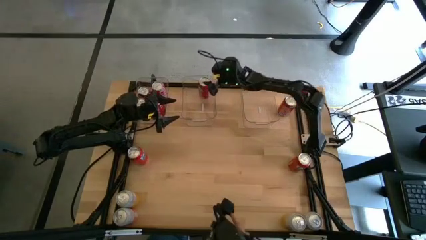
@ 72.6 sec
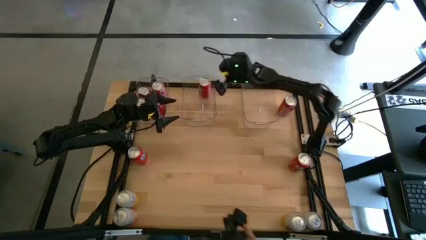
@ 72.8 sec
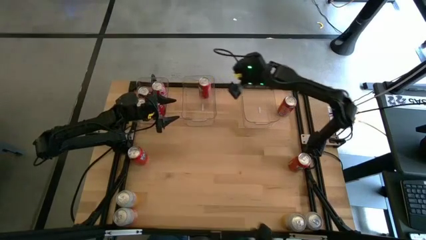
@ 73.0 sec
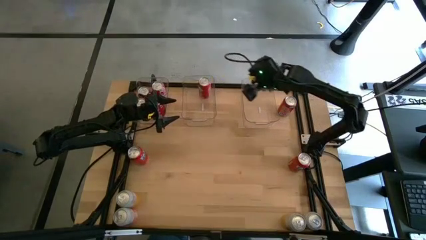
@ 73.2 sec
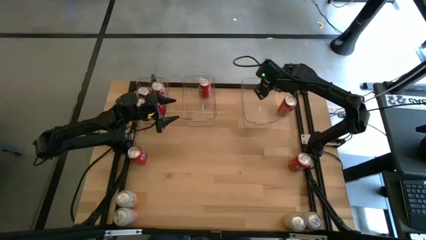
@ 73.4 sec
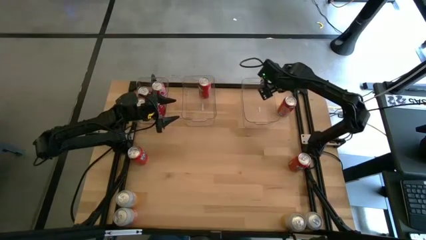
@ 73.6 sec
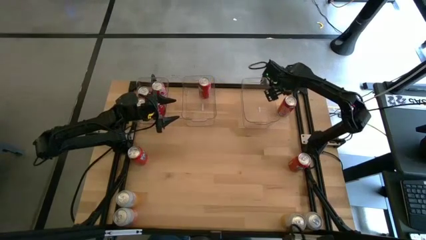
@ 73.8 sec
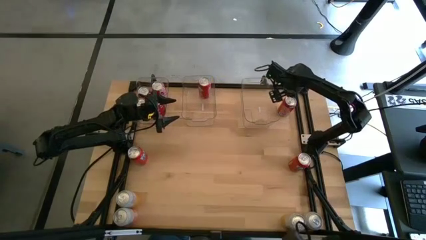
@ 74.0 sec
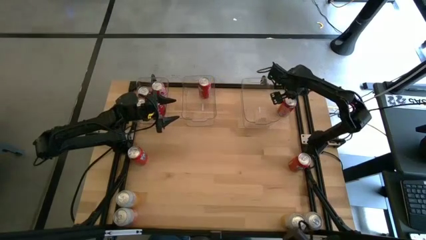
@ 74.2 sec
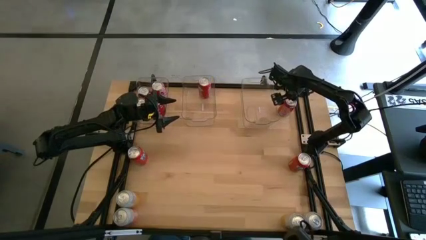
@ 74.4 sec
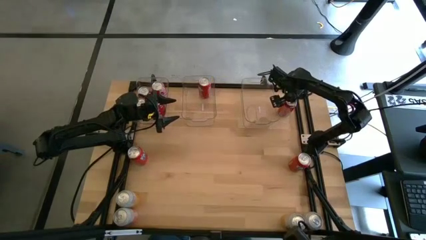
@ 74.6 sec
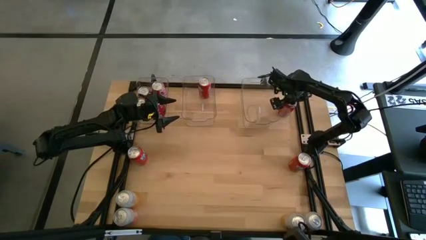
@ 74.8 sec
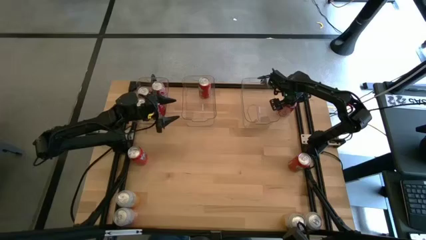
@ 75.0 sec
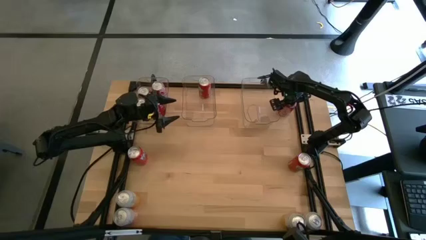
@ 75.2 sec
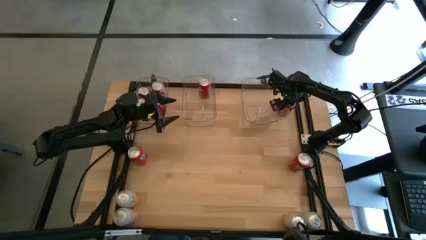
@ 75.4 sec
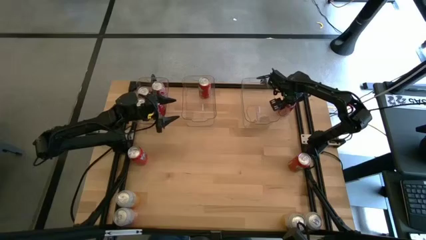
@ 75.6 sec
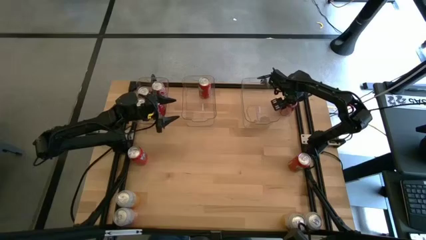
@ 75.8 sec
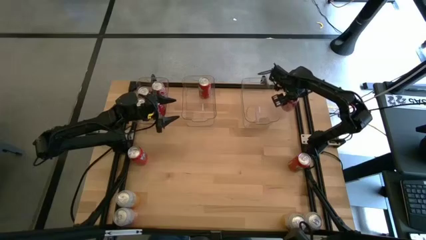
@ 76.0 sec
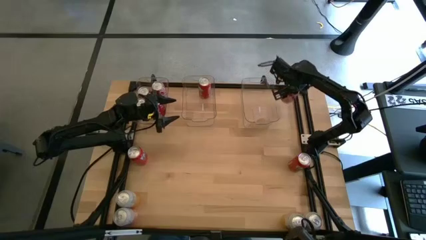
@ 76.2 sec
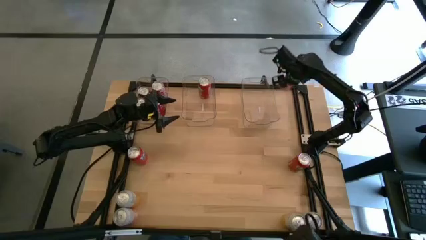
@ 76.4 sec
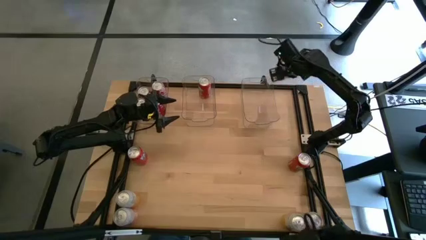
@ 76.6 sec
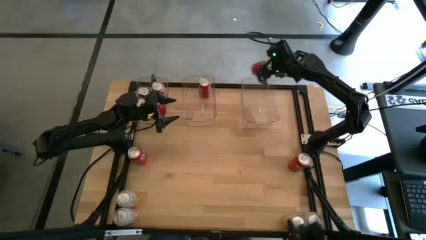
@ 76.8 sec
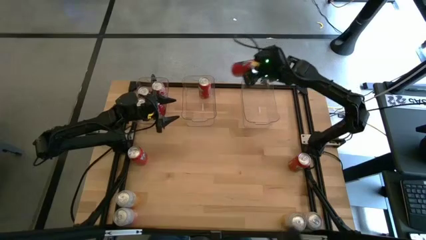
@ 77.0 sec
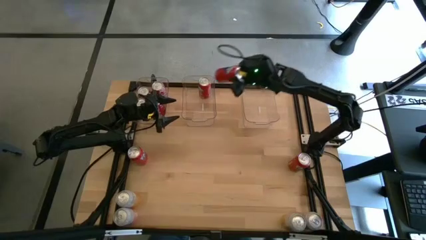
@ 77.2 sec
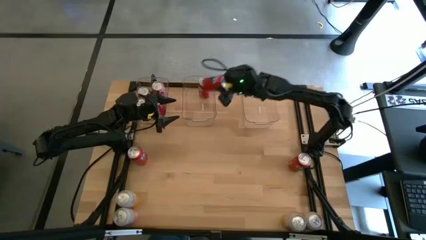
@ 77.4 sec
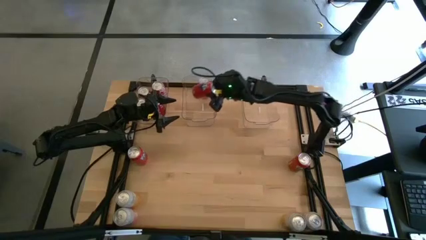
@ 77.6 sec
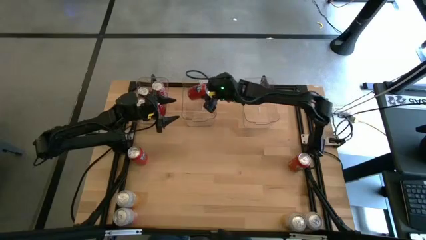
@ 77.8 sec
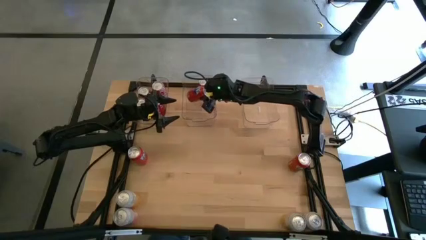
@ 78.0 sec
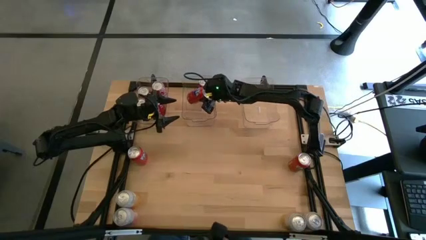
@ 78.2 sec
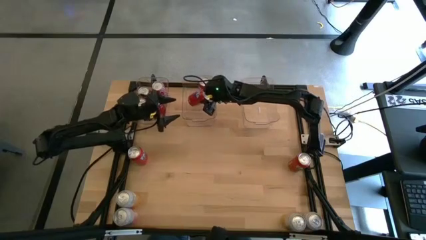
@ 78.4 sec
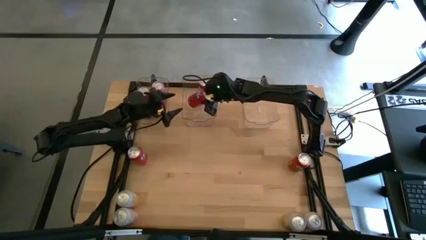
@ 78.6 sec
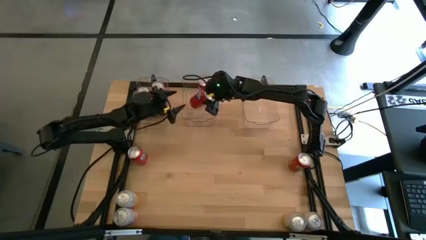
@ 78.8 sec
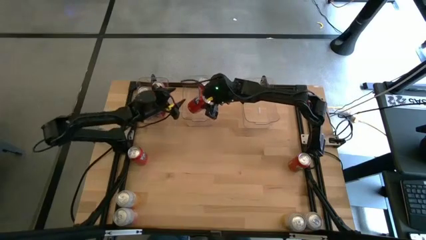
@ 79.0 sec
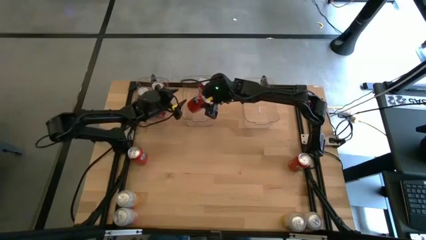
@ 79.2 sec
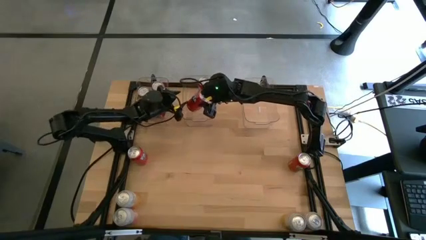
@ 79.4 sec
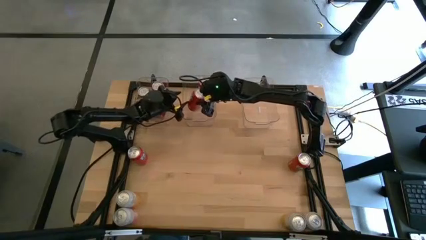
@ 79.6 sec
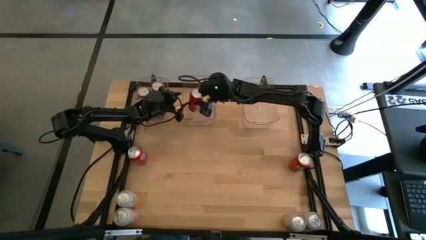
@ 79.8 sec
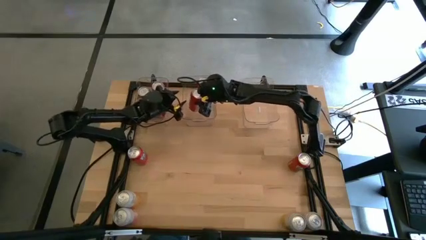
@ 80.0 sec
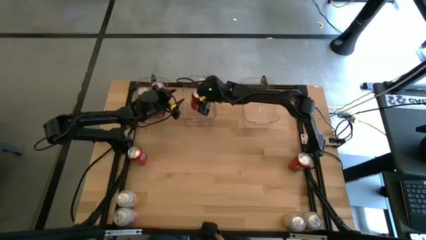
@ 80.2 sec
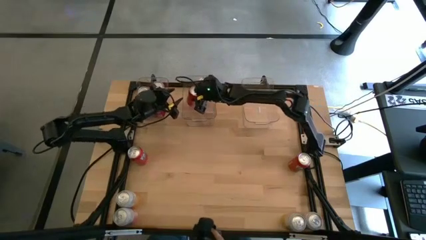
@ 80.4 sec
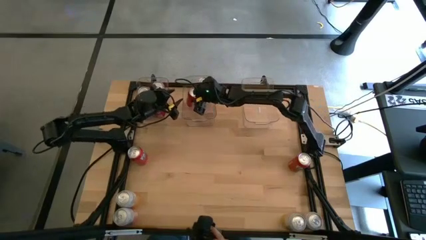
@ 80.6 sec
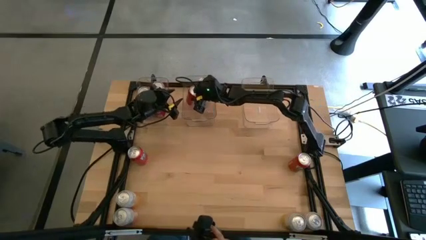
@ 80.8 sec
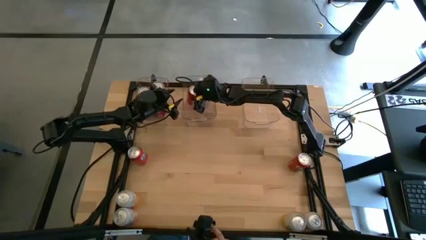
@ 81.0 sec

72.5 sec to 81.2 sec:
Task: Sort soda cans
Put the orange soda can into the middle transparent bin

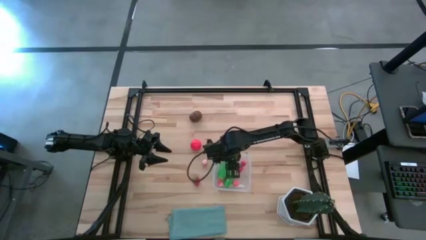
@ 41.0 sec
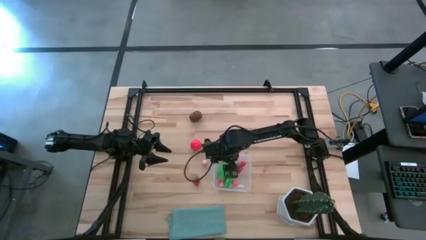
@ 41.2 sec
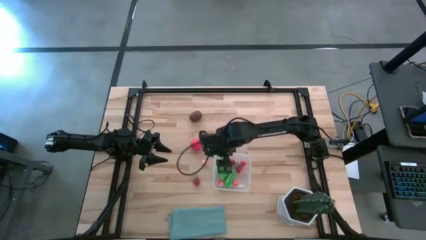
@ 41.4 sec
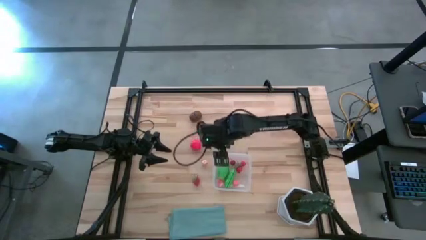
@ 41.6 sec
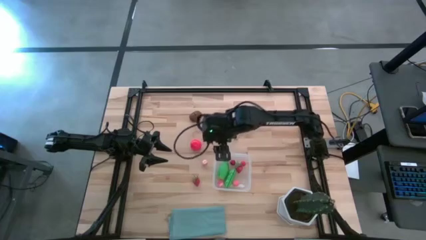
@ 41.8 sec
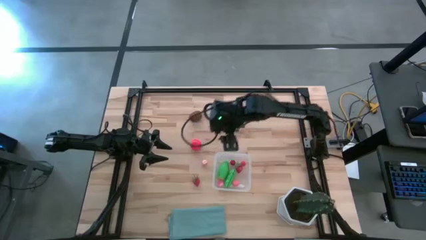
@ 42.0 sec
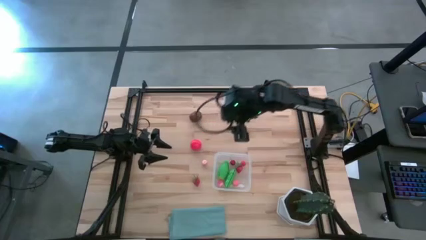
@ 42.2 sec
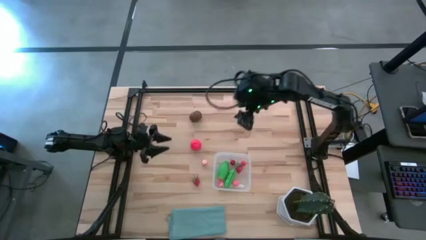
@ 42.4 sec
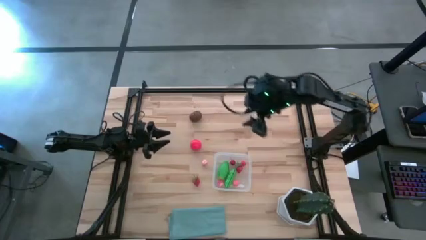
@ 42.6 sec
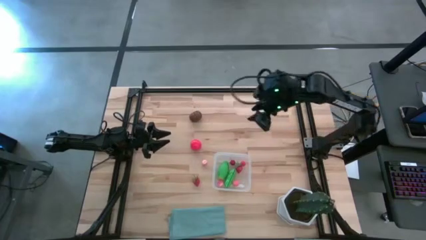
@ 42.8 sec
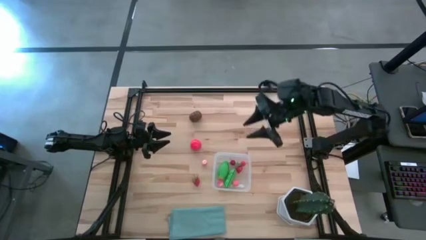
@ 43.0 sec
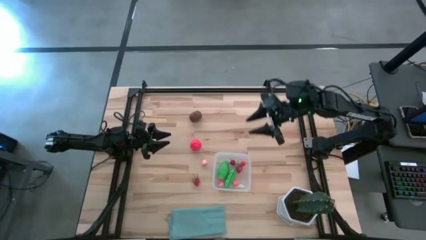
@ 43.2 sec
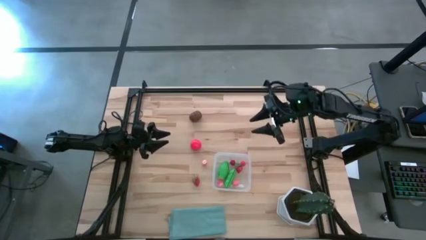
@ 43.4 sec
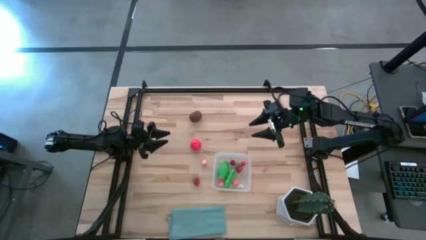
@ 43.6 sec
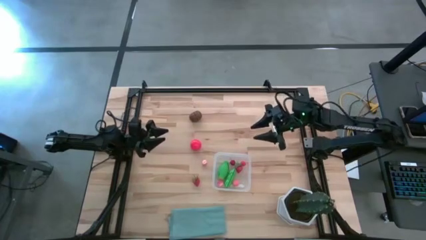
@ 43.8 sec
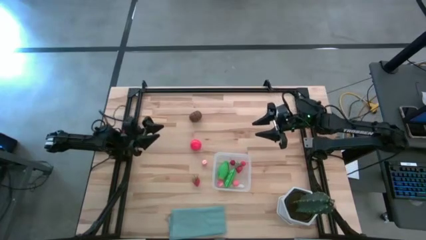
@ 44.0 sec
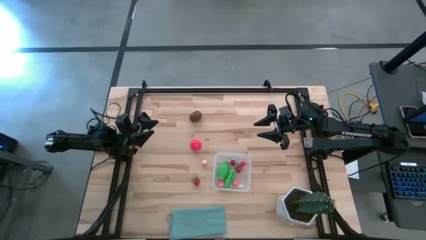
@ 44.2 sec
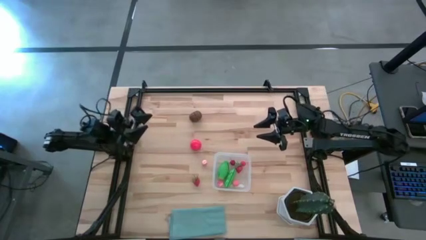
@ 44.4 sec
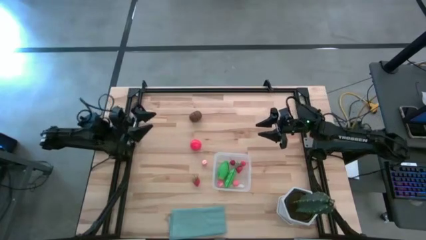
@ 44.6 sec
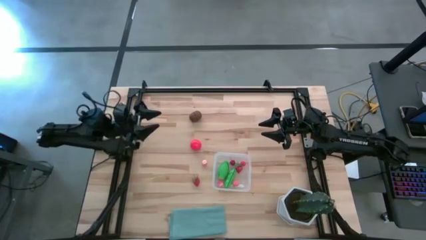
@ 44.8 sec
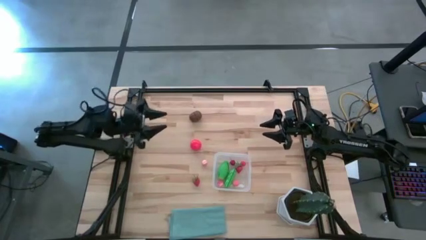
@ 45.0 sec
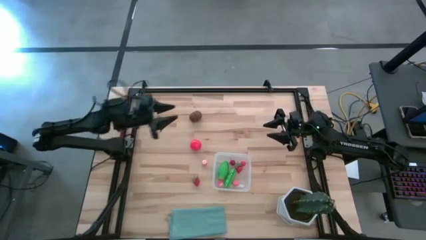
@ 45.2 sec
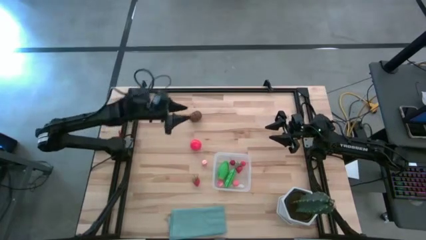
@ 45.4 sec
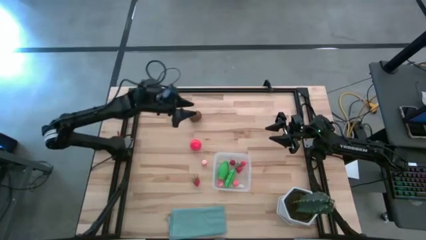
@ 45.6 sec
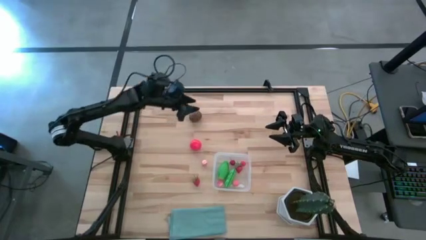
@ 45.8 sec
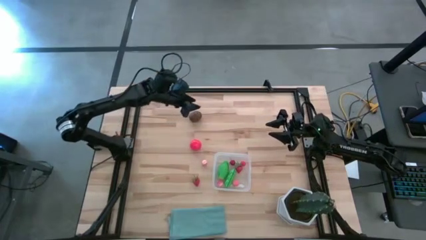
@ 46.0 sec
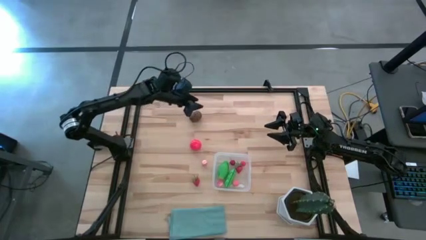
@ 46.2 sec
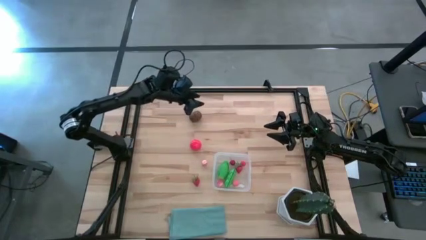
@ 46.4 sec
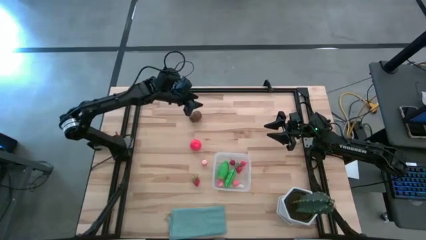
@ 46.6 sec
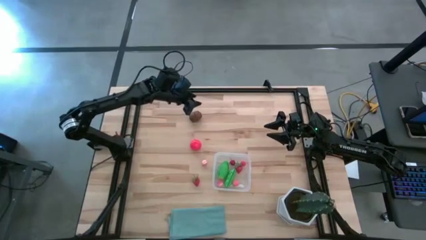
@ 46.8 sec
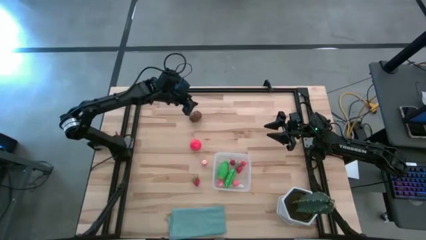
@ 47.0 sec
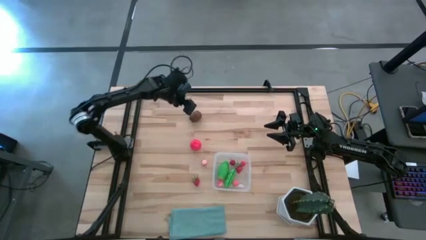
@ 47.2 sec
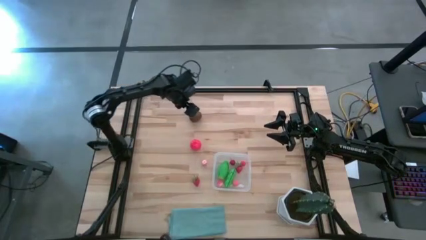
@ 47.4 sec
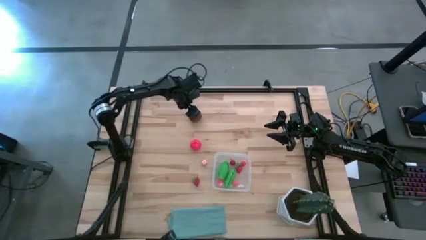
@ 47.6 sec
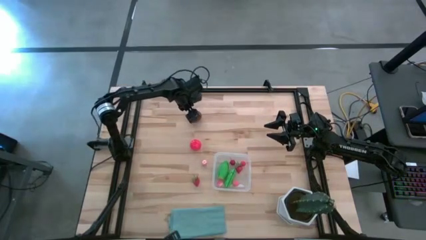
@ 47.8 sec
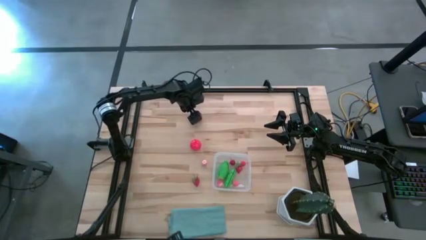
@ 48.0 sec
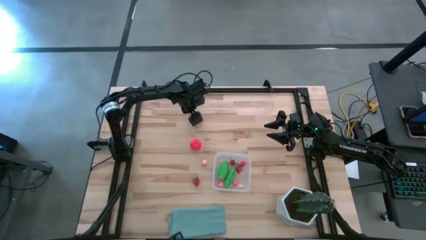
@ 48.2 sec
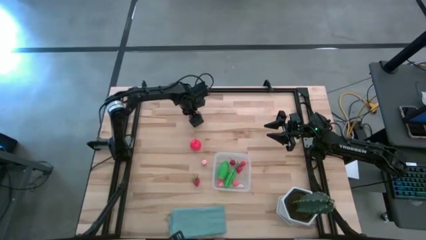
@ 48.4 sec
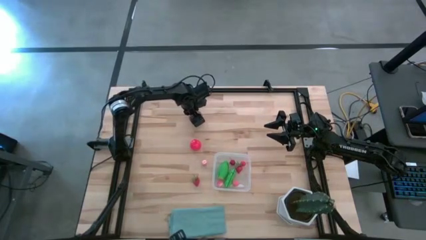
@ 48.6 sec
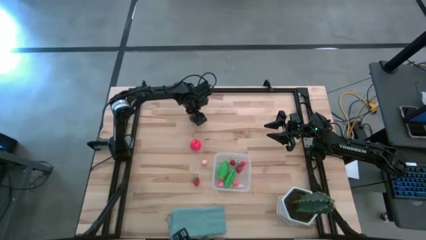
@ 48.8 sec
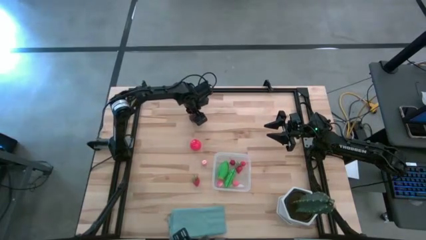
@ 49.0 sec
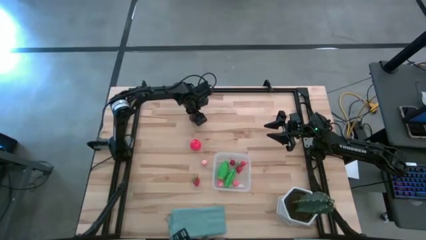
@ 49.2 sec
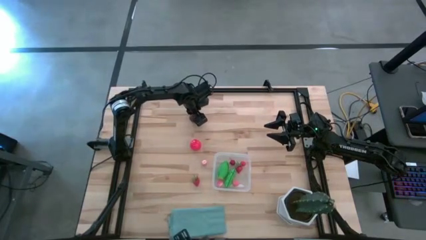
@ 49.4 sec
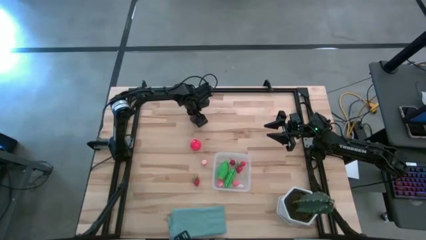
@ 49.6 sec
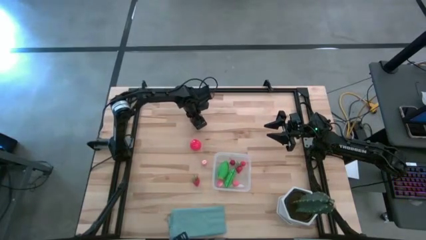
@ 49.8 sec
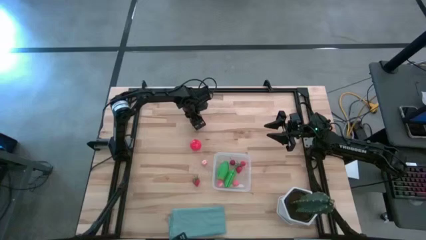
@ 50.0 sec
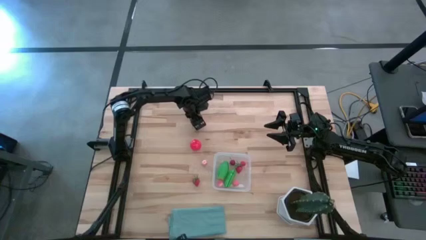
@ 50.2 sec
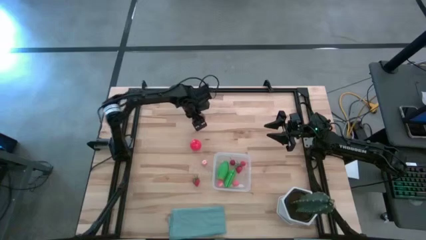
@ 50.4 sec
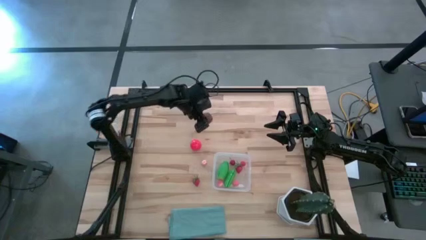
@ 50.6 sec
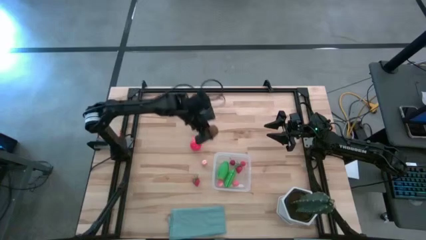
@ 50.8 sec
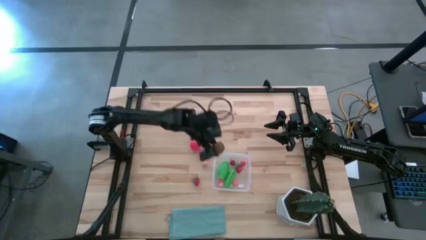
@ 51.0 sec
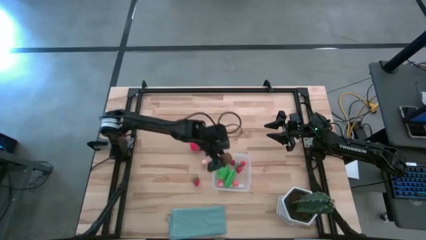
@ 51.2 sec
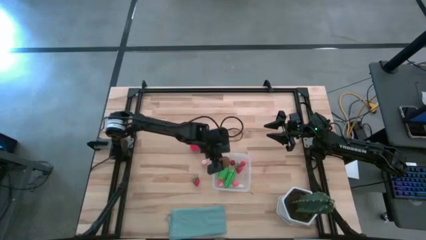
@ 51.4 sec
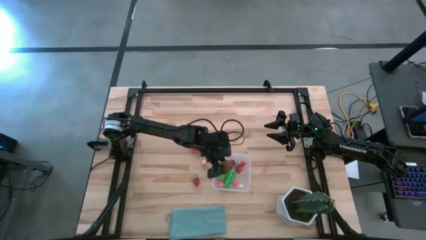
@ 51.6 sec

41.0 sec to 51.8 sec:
Task: Pick and placing Produce into tupperware
Put the kiwi into the transparent container
